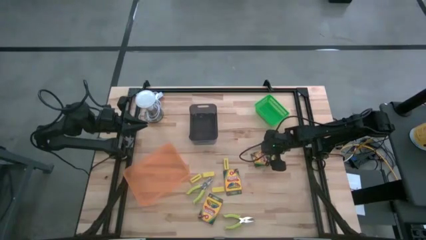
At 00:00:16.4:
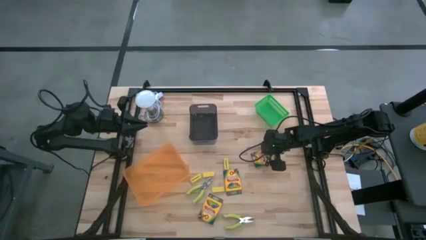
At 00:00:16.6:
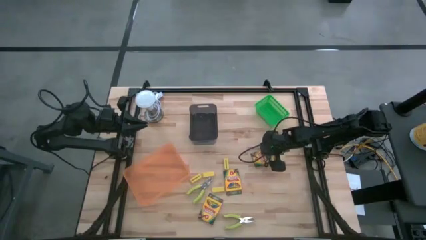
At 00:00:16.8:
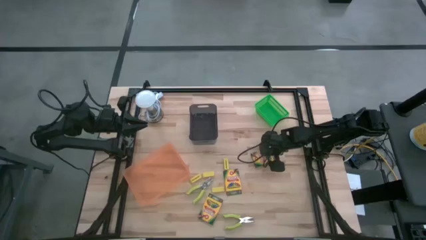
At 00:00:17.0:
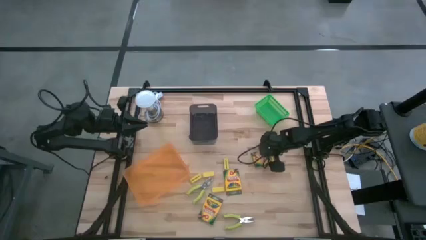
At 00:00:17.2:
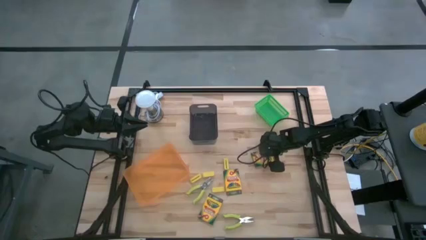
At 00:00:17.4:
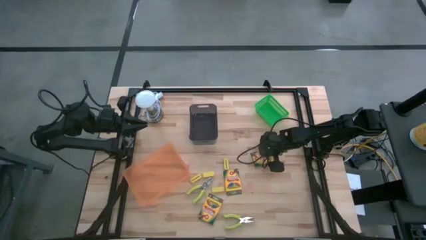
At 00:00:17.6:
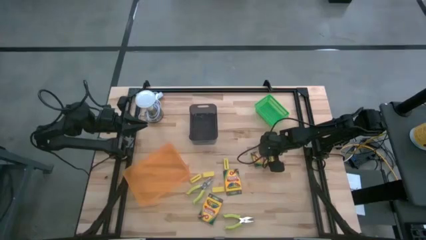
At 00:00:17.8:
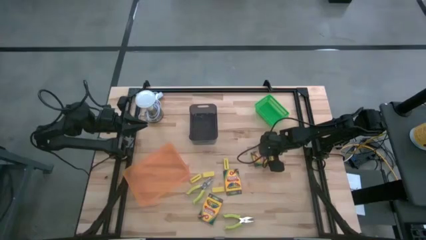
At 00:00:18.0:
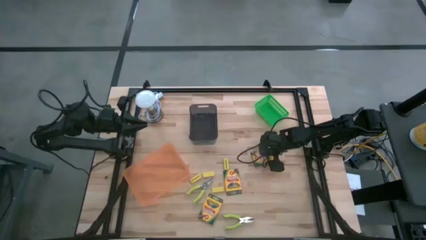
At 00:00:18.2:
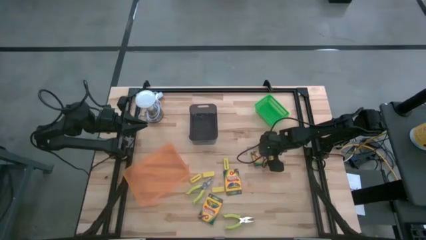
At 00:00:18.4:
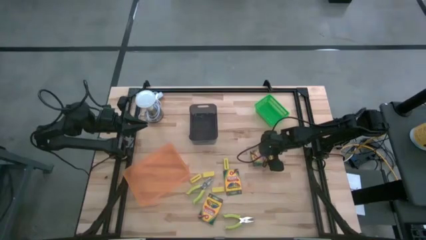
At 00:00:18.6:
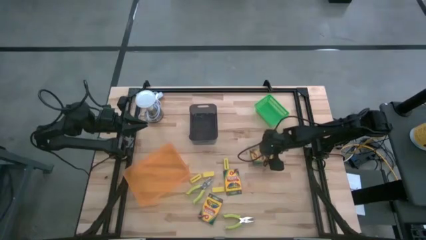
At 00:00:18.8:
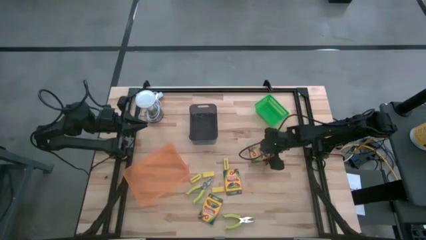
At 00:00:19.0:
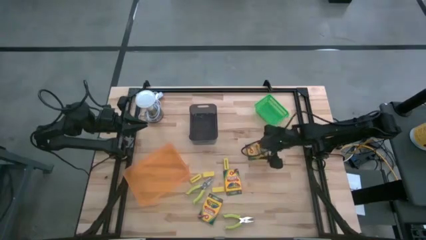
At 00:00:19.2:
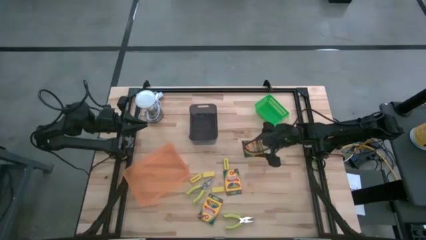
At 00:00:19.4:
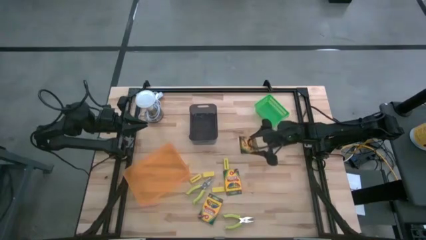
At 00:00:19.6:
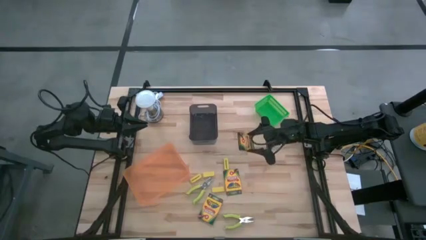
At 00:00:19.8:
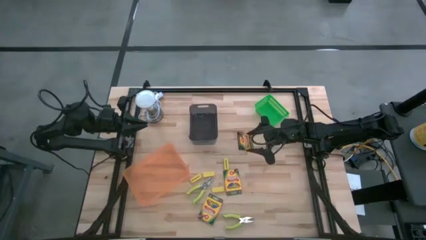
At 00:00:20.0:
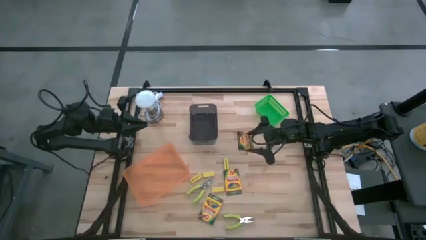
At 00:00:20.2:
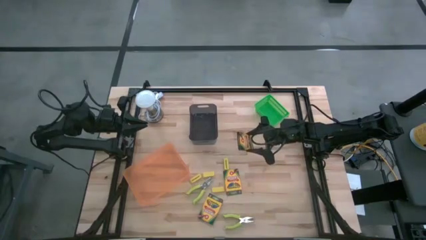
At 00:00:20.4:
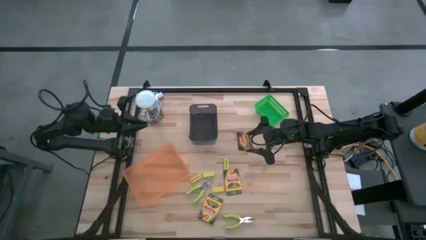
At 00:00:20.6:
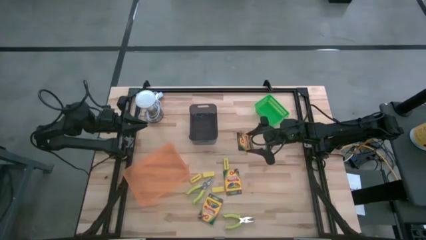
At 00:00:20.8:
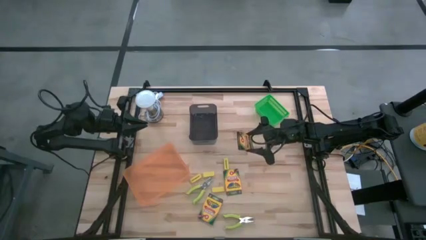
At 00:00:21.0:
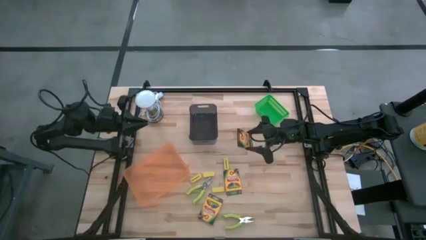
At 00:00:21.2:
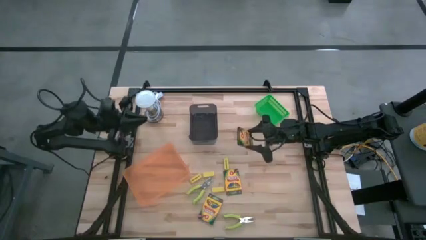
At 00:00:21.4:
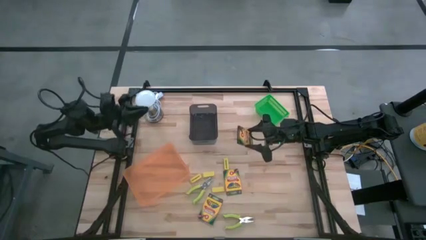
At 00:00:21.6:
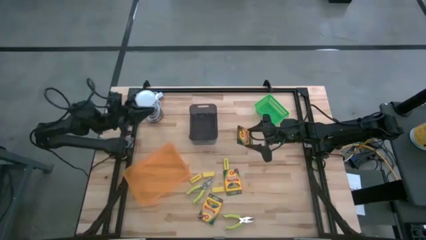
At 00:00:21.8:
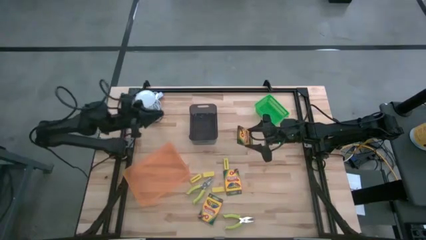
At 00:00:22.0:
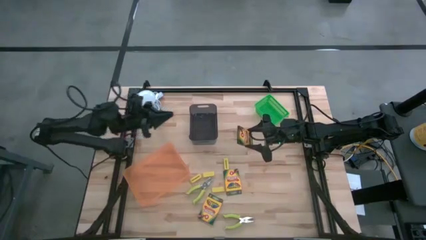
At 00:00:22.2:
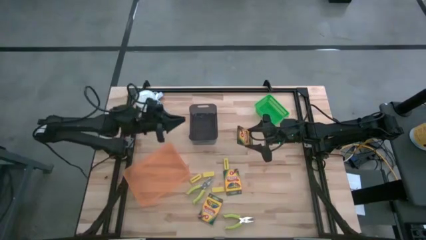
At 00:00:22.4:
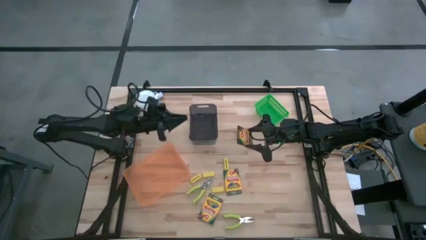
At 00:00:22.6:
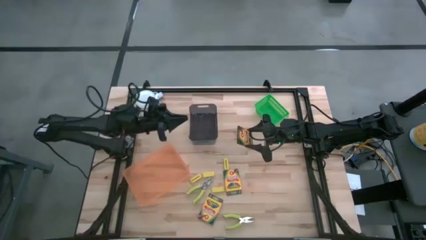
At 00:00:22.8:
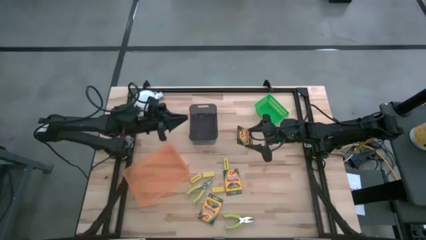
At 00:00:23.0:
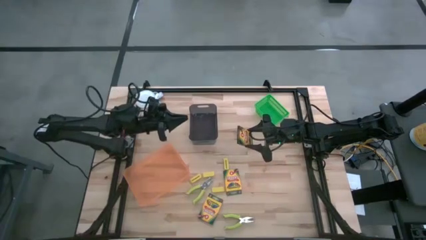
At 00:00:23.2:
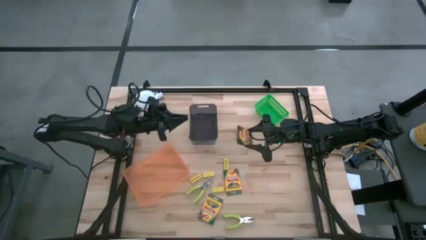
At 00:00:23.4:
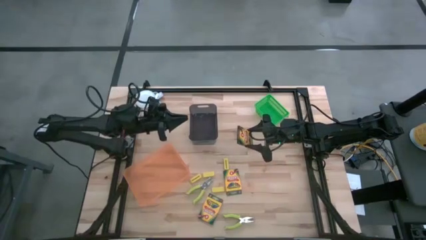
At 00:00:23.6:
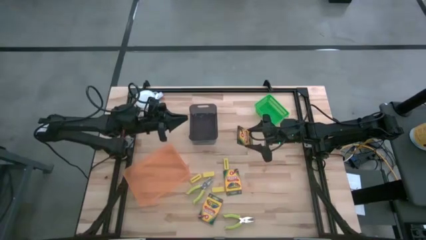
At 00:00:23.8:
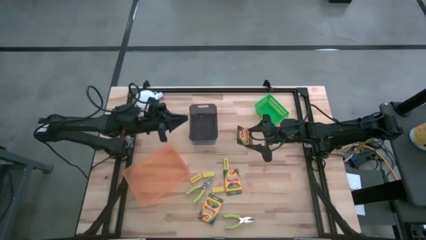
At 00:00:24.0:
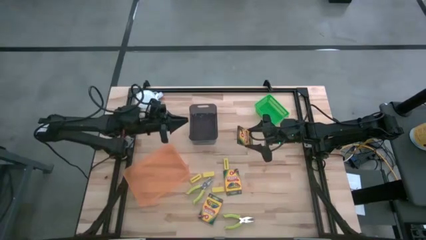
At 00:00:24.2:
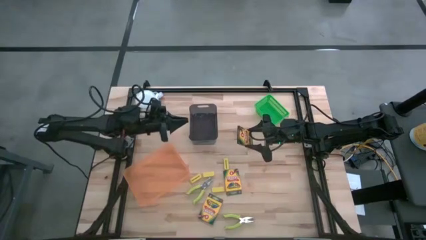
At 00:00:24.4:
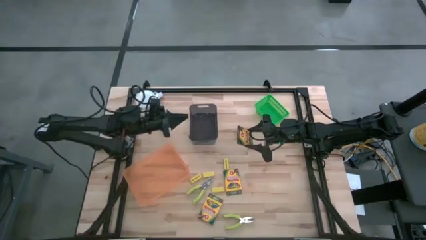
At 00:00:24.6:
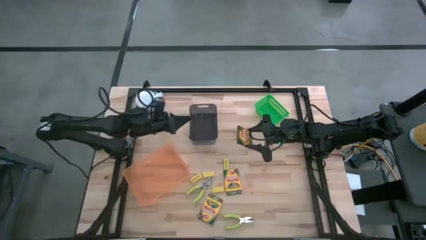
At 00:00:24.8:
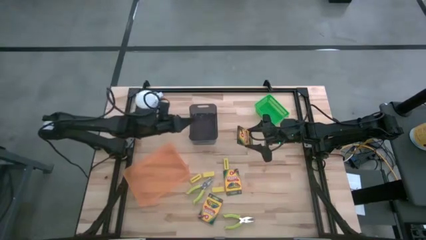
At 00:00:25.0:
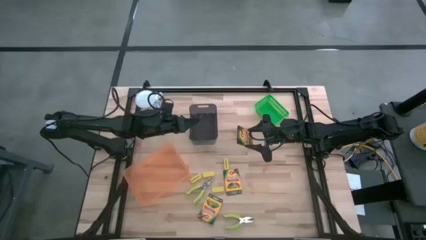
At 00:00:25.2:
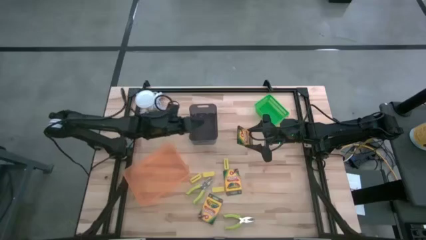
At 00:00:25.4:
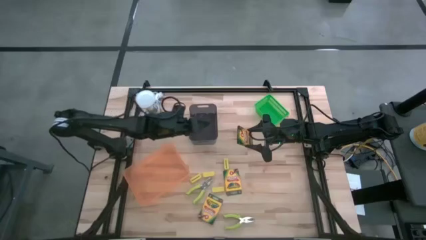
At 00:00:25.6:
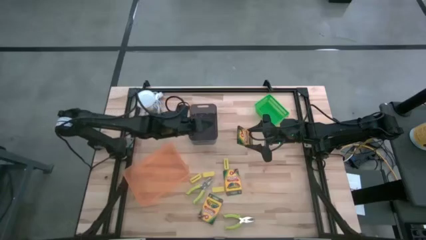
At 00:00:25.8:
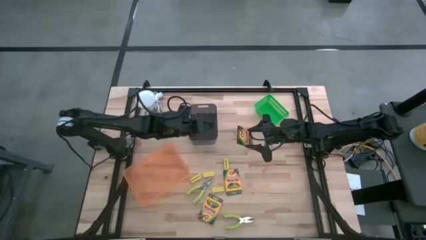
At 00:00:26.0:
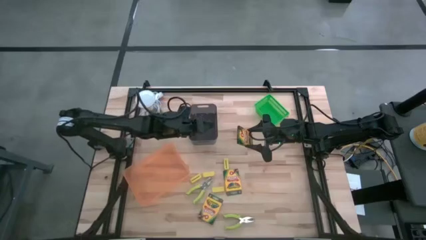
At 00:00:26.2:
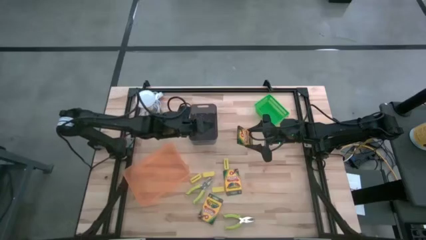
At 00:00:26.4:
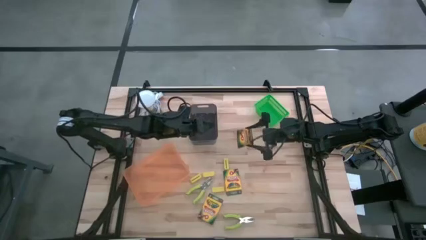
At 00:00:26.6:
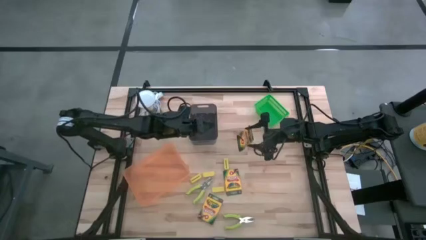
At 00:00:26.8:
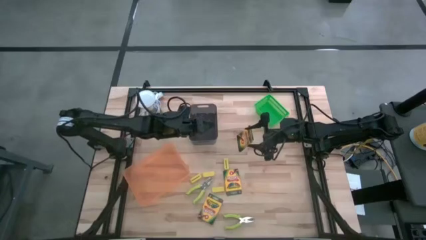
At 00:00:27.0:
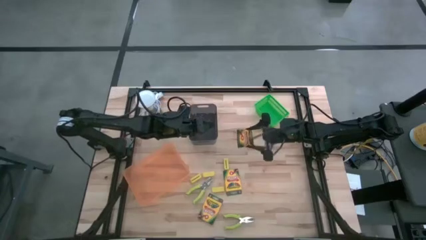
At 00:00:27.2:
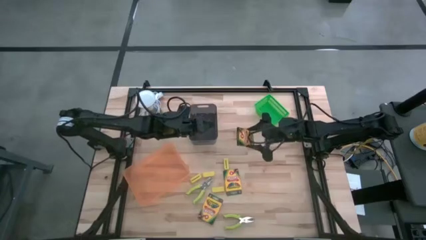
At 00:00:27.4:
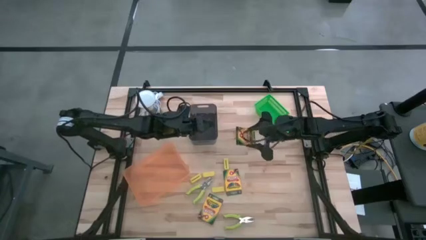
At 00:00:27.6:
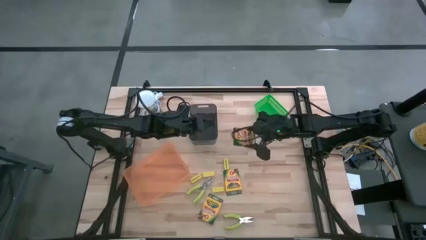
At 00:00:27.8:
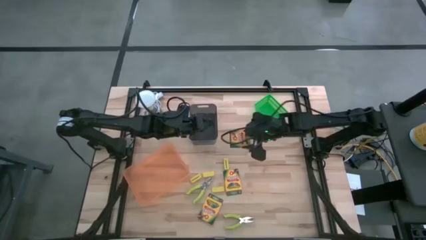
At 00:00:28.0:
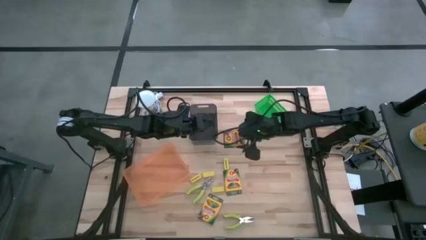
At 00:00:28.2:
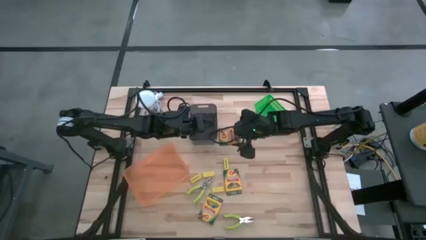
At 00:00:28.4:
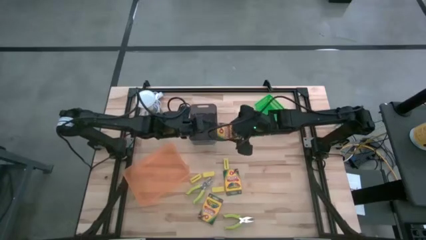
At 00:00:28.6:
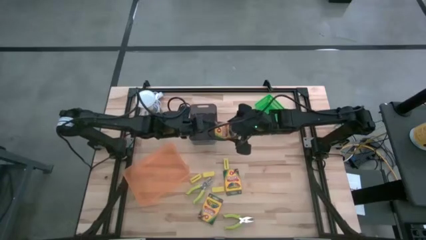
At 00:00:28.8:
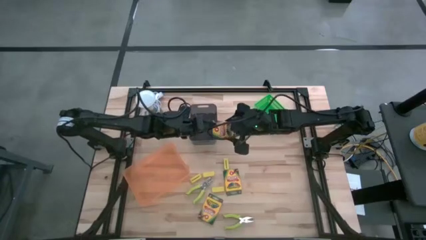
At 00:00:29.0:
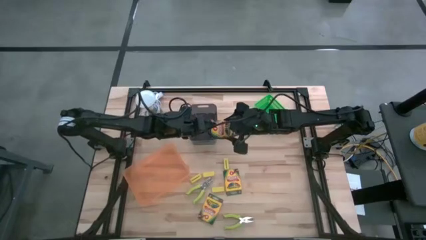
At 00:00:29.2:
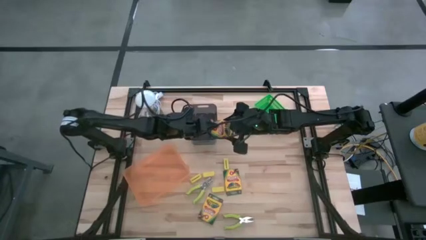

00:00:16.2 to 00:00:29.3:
Task: Pick & Place School Supplies
Put the pack of crayons into the orange bin
